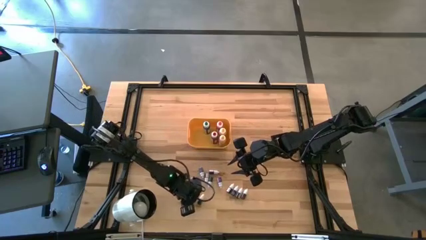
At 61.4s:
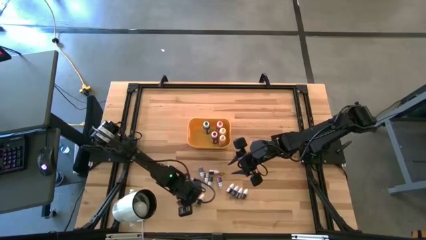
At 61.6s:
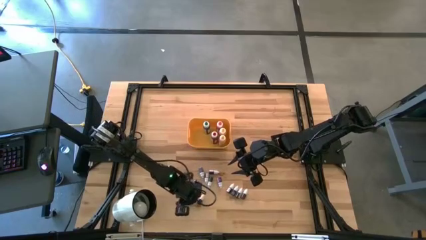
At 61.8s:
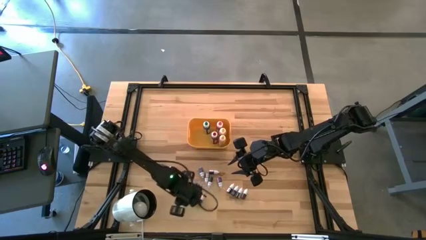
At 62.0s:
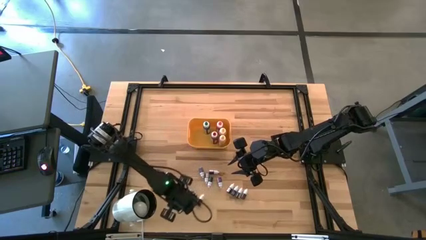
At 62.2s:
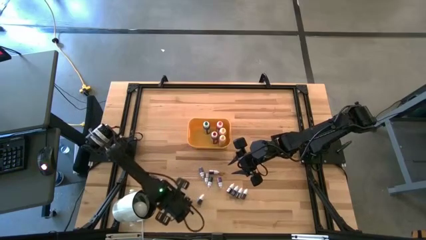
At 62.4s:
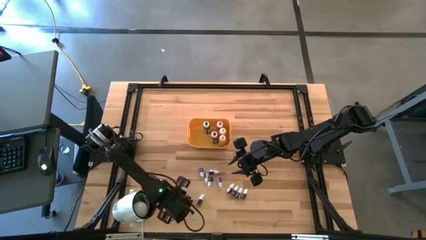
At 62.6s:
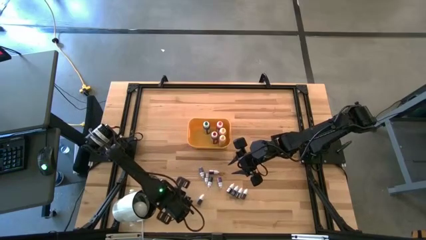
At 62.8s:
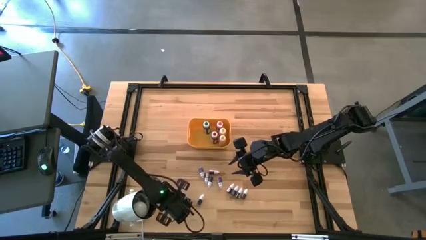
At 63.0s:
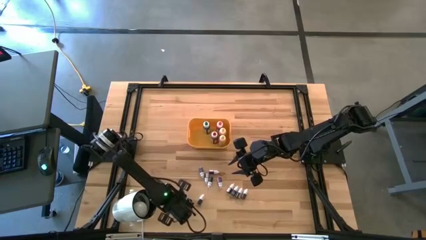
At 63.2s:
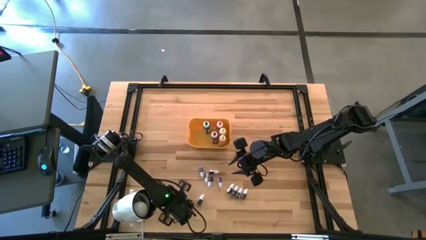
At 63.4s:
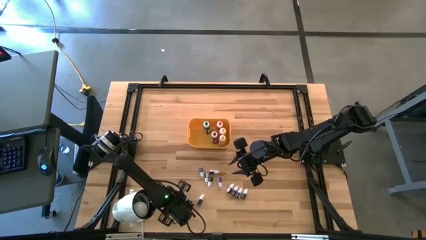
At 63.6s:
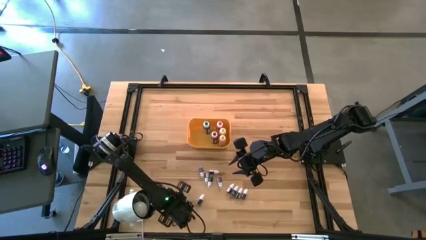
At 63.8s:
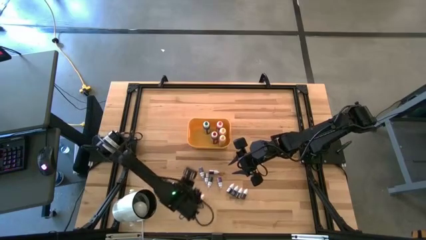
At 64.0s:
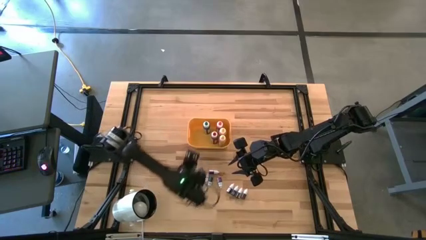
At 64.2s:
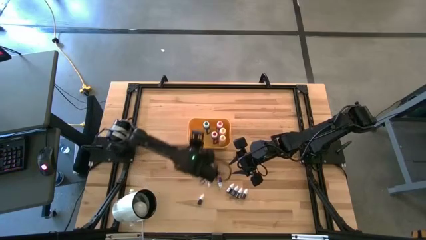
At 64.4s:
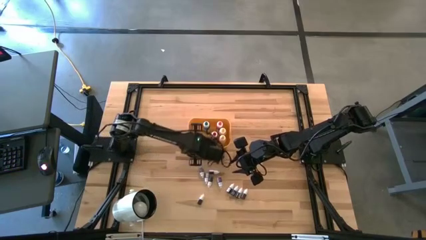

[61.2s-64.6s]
Task: Pick & Place food coloring
Put the small red food coloring bottle into the yellow bin

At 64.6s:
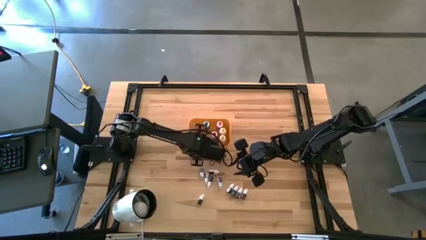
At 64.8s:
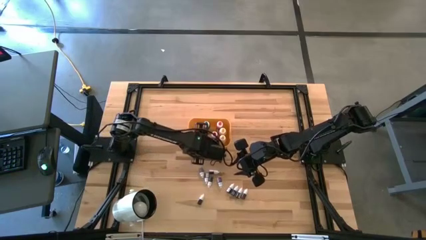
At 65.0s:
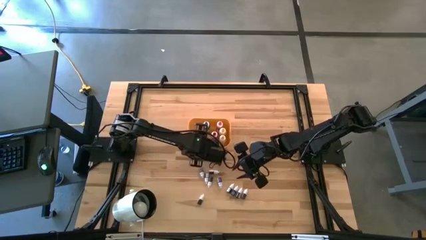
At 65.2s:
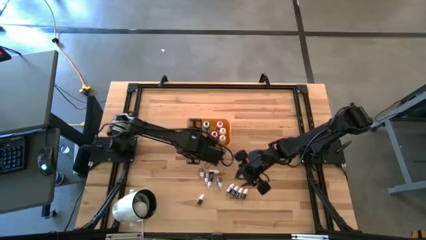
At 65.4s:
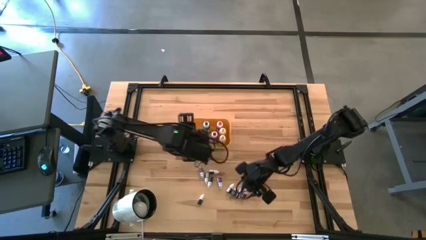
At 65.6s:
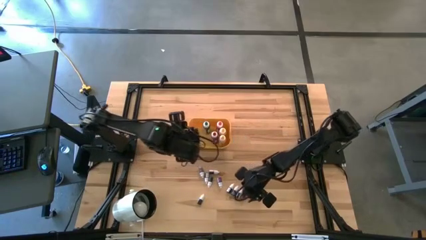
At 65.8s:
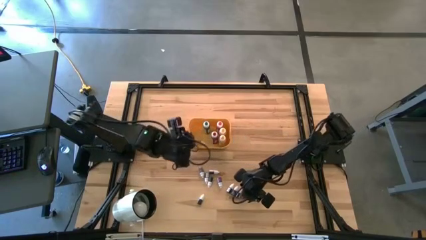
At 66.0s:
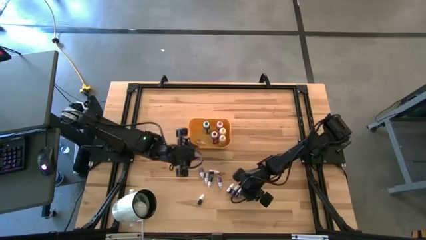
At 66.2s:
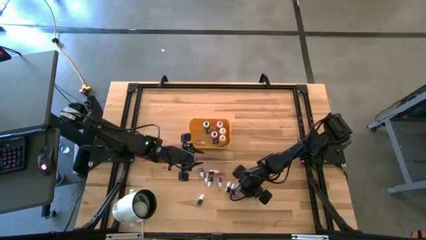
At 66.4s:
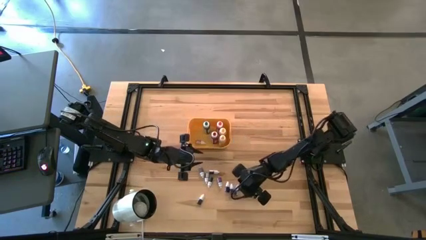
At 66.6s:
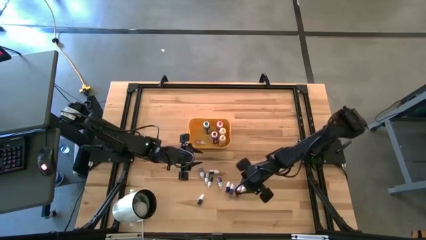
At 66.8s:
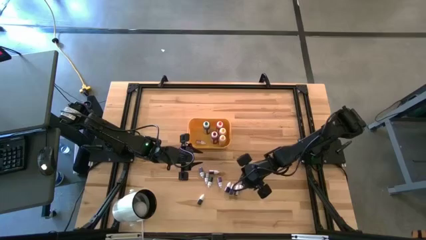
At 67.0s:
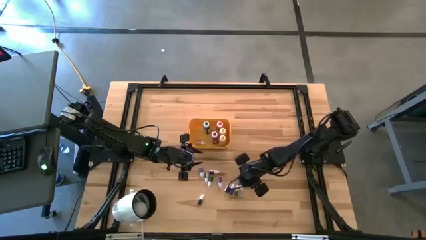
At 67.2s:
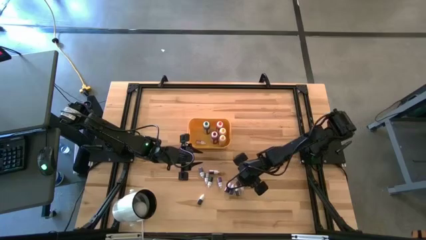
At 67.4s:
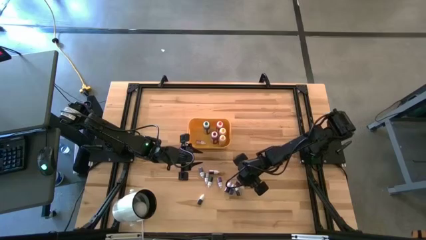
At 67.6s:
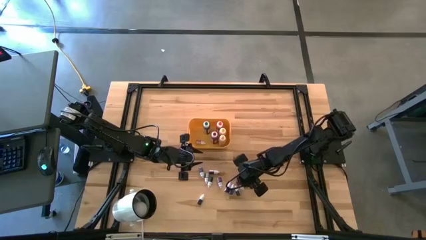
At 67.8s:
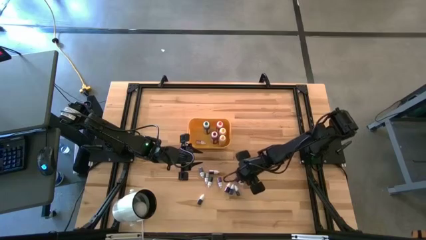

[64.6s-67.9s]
Put the small red food coloring bottle into the yellow bin

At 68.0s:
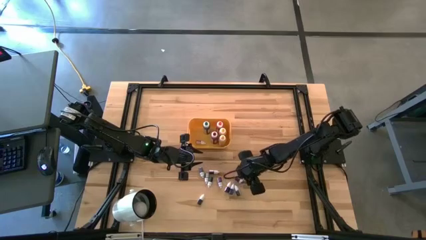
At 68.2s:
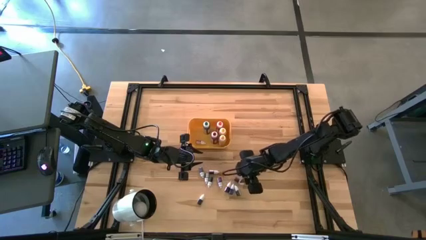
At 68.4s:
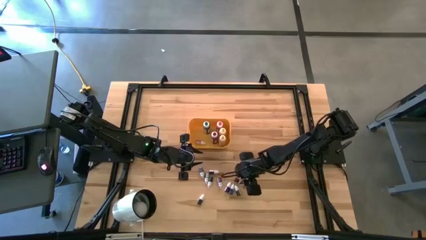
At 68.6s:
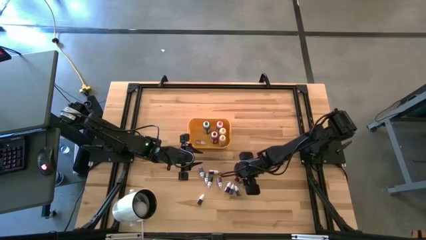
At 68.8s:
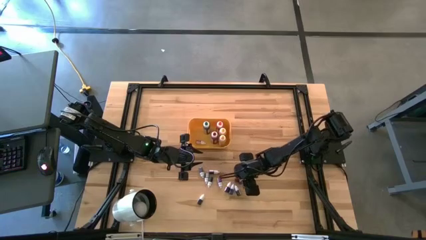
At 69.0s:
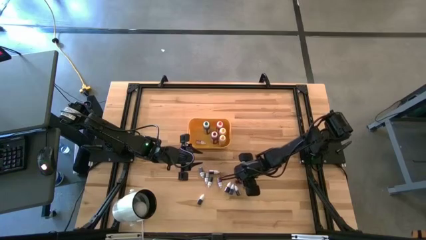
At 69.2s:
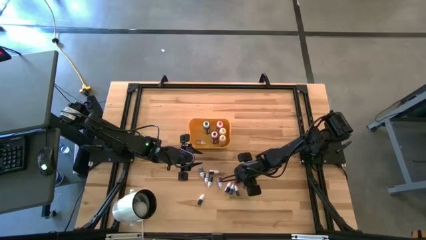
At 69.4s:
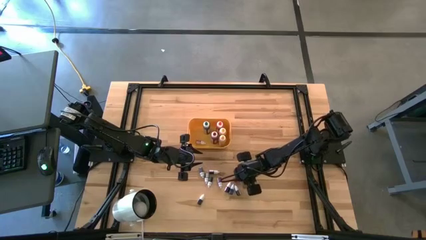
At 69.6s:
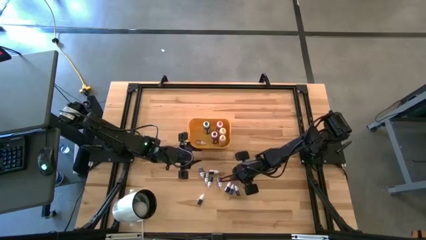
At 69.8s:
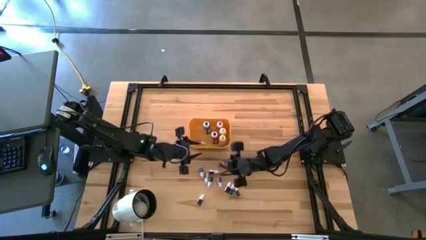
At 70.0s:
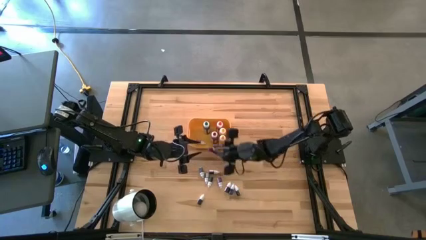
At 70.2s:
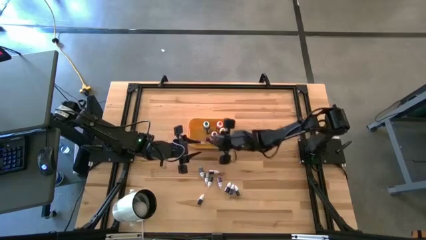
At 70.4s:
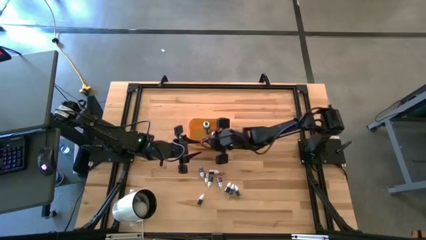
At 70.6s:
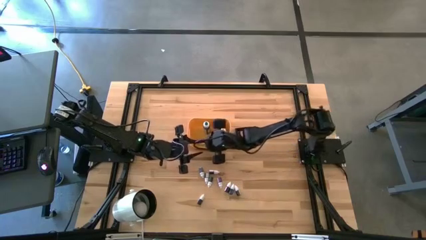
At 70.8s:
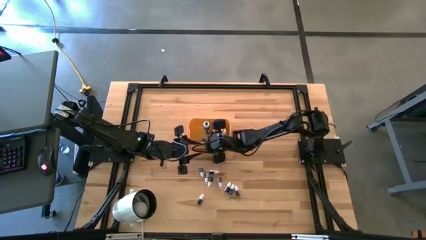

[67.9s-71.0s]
Put the small red food coloring bottle into the yellow bin

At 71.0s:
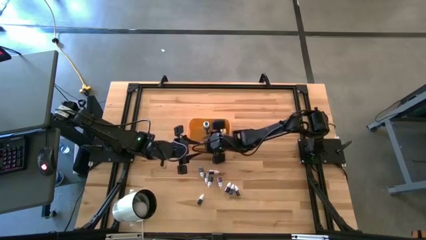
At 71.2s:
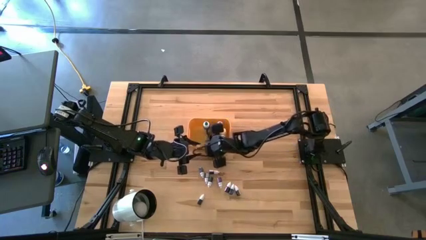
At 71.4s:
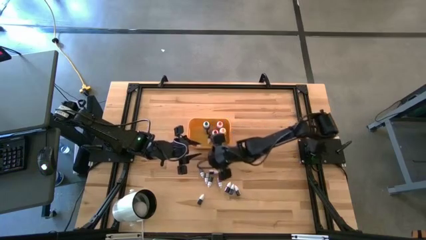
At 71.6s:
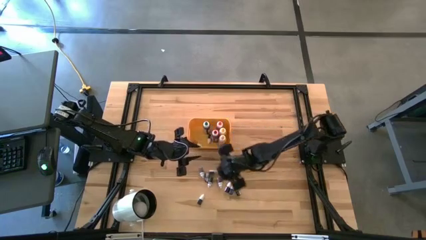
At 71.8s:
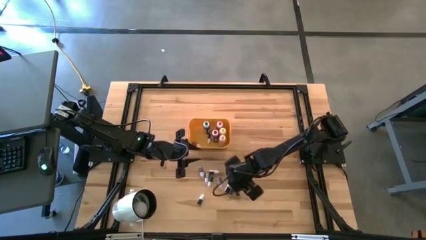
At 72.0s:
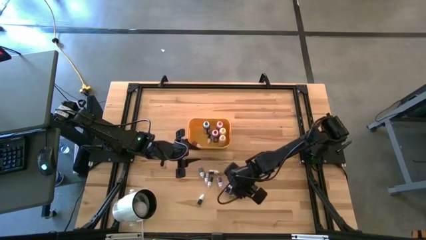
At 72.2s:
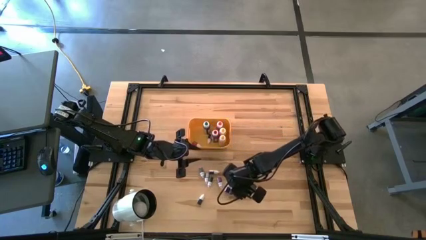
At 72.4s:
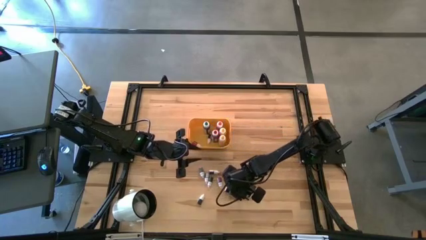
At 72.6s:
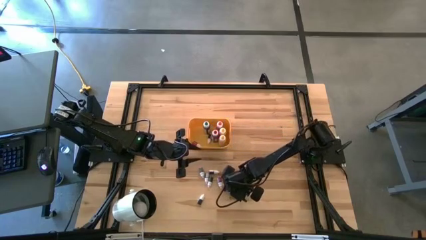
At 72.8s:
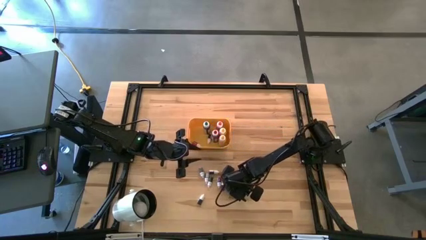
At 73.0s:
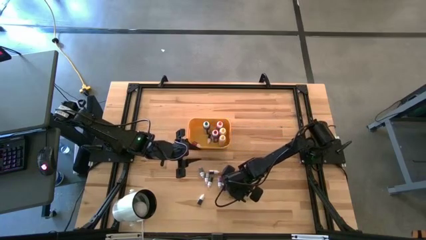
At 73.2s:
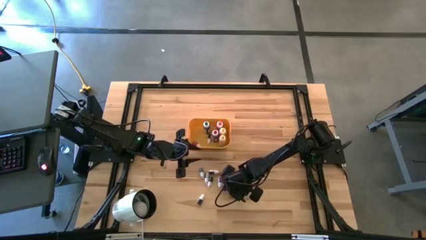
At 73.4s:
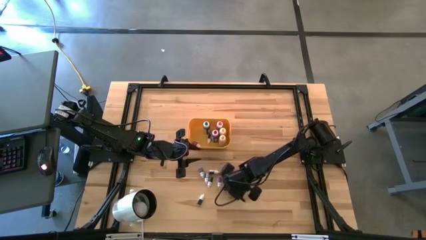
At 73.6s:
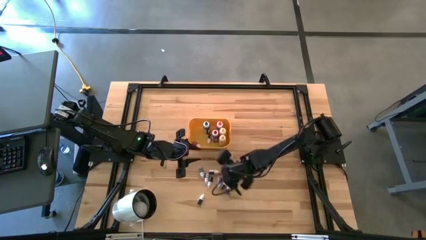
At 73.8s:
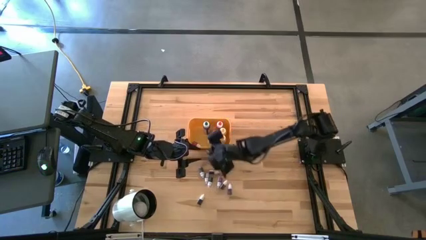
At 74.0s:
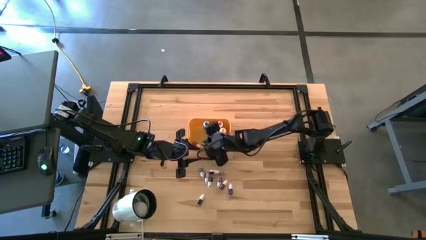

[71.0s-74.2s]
Put the small blue food coloring bottle into the yellow bin

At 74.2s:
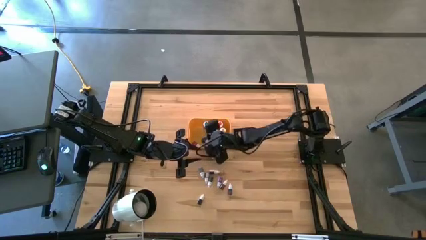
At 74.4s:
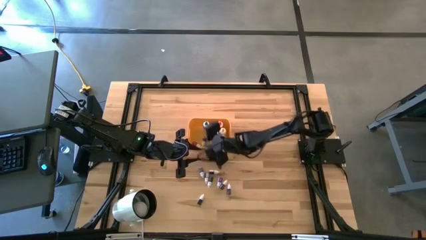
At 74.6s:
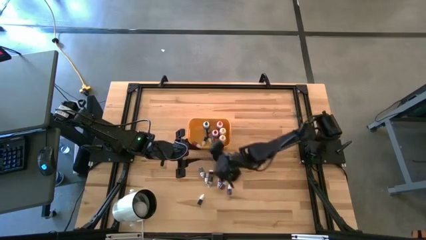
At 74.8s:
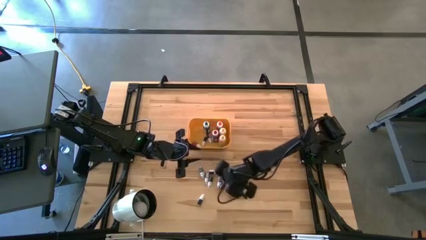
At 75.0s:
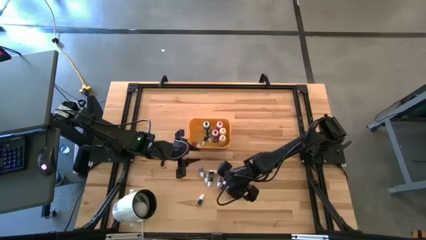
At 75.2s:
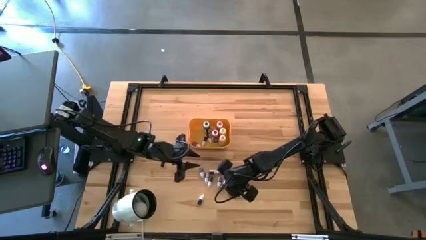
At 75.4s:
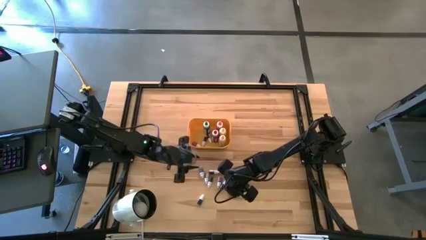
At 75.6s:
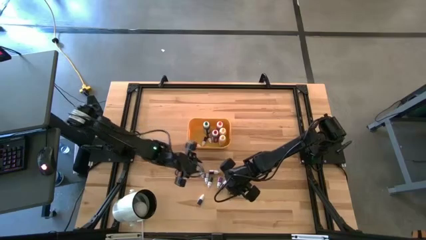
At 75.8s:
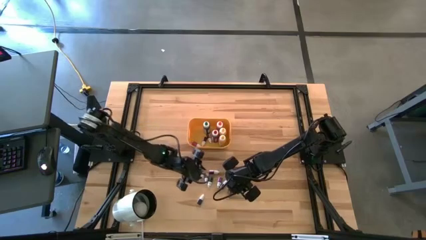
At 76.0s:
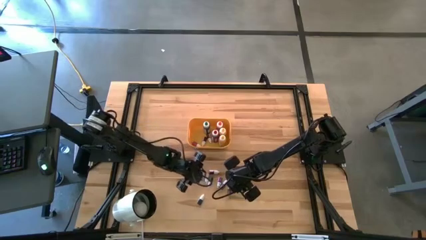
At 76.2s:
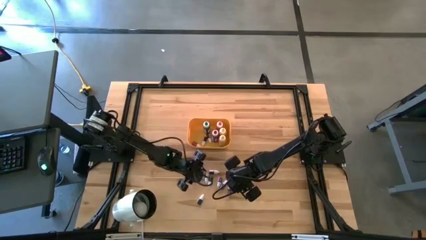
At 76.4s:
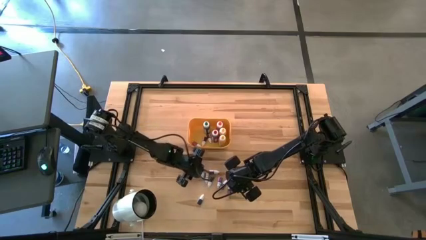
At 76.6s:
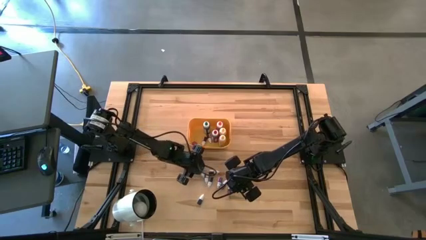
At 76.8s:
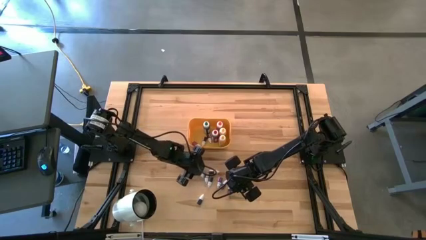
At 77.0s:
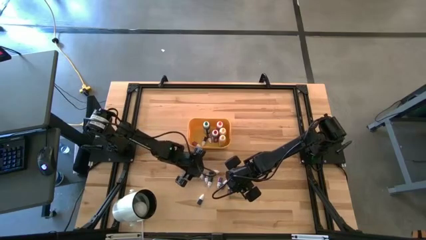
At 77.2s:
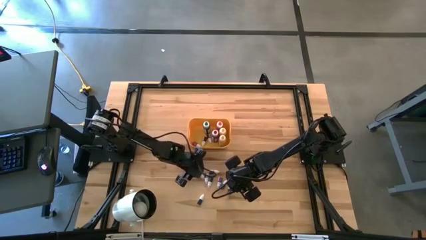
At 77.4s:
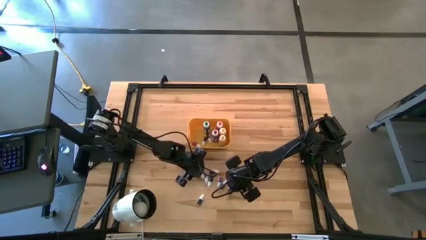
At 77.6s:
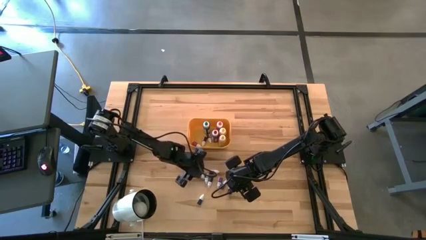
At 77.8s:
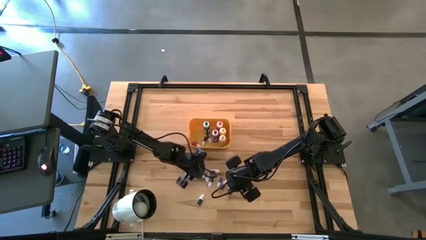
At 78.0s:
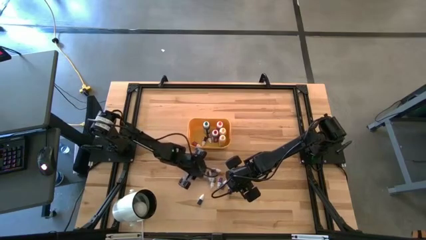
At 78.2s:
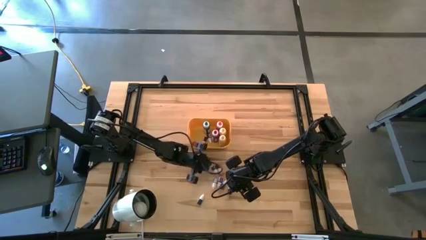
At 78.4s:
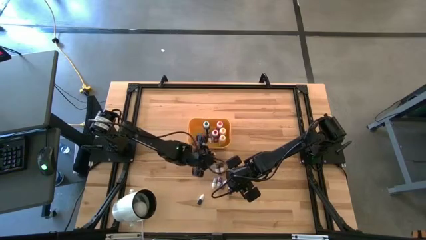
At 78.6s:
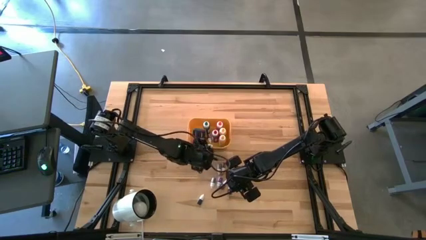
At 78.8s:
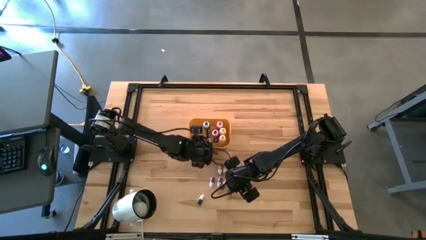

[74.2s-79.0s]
Put the small blue food coloring bottle into the yellow bin
